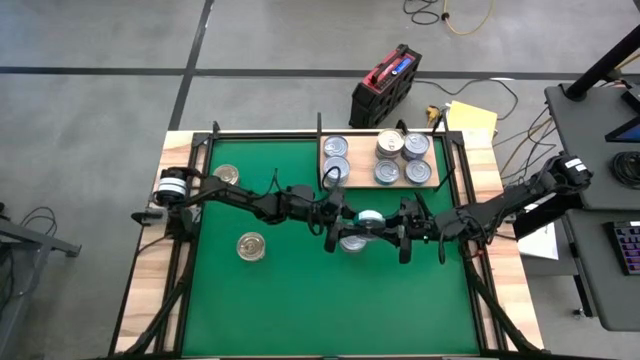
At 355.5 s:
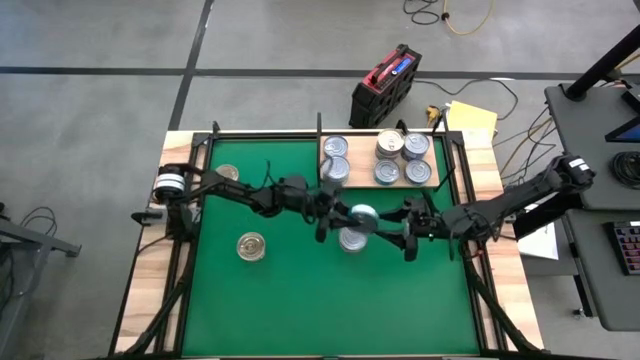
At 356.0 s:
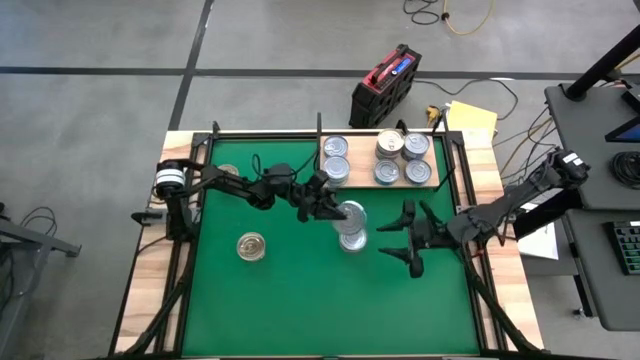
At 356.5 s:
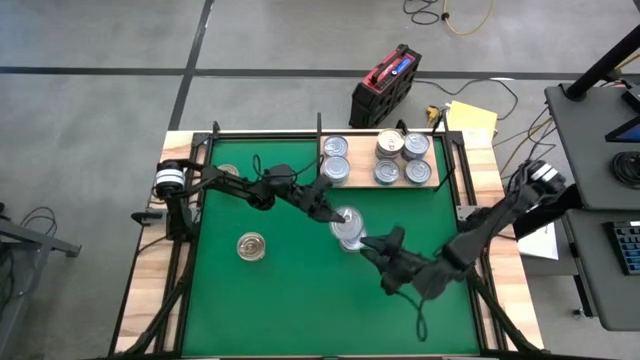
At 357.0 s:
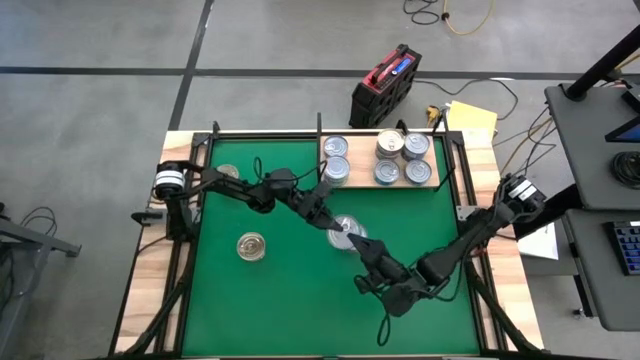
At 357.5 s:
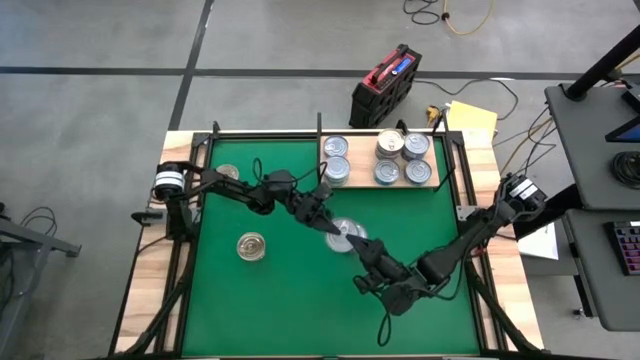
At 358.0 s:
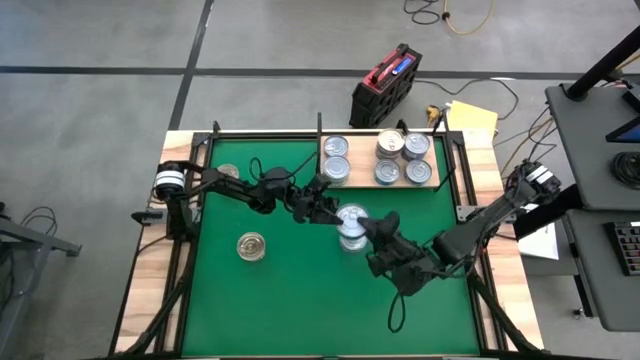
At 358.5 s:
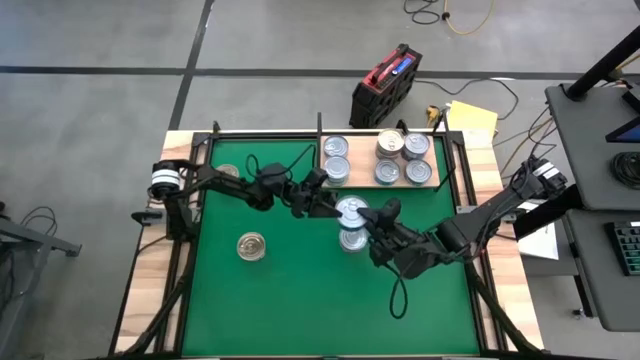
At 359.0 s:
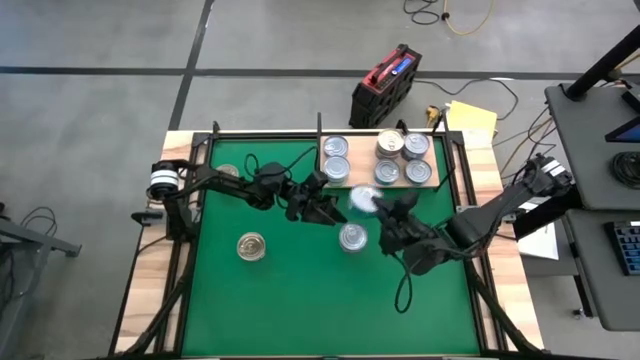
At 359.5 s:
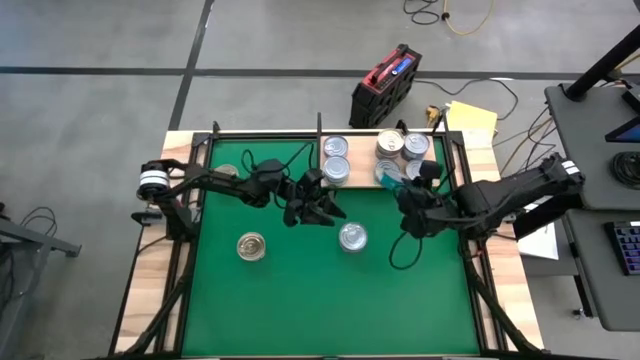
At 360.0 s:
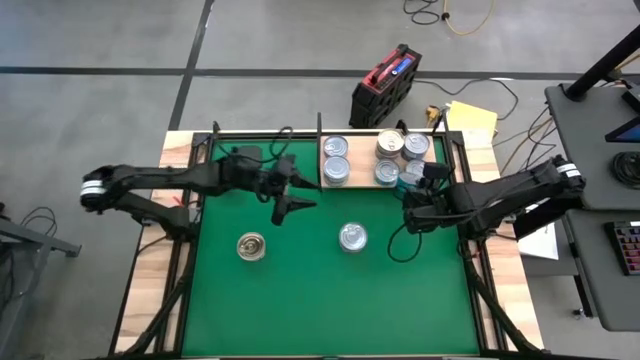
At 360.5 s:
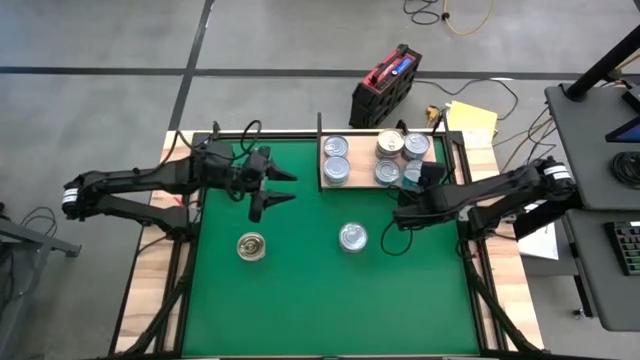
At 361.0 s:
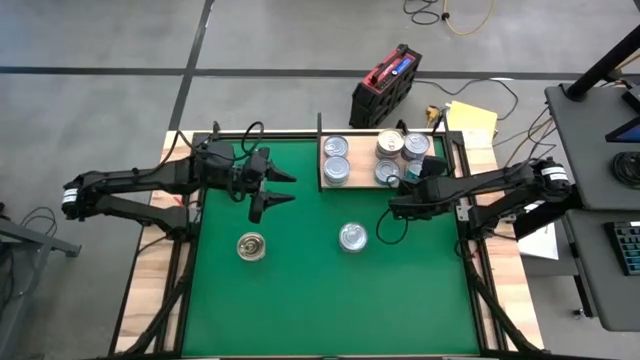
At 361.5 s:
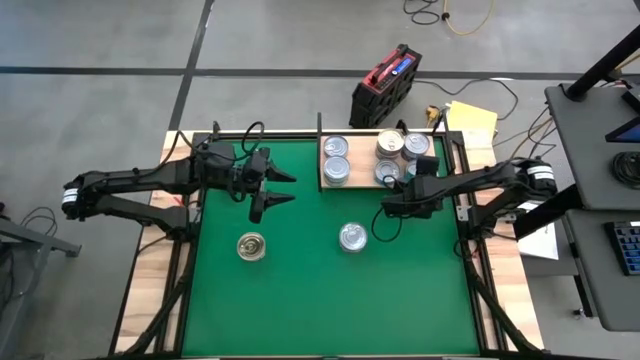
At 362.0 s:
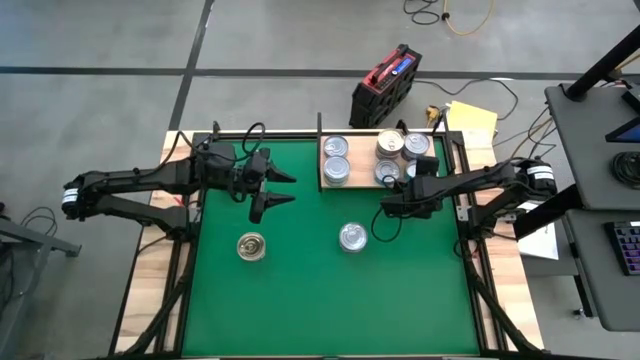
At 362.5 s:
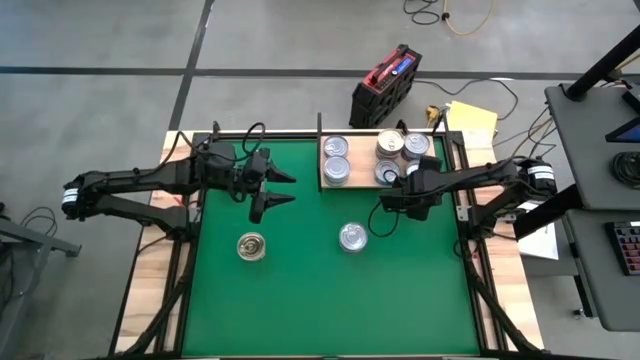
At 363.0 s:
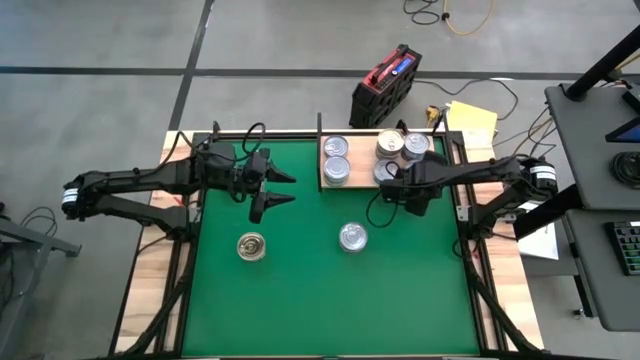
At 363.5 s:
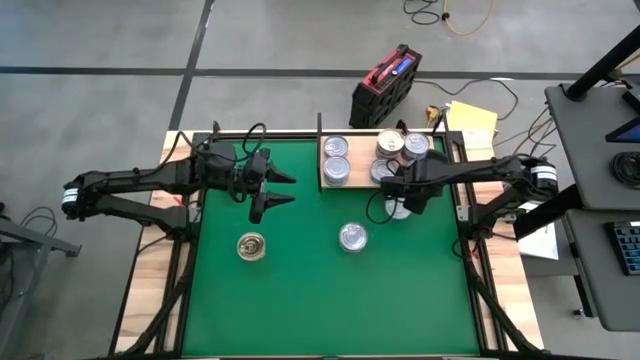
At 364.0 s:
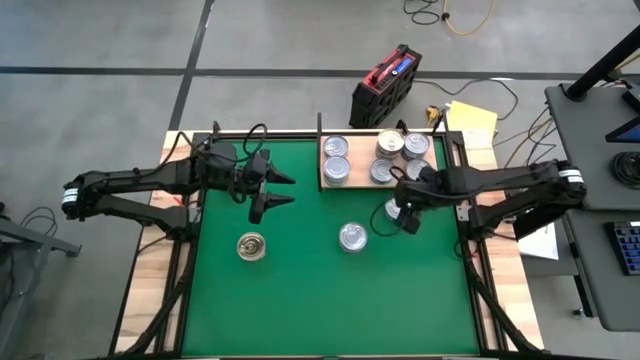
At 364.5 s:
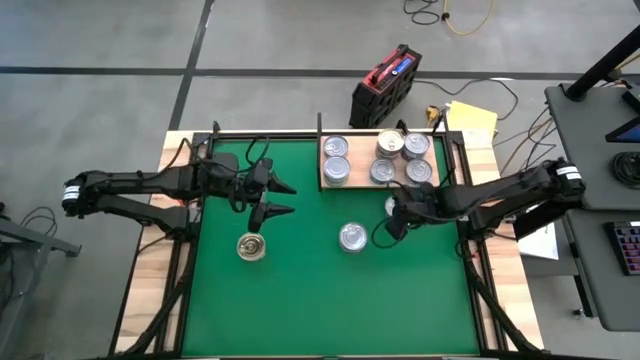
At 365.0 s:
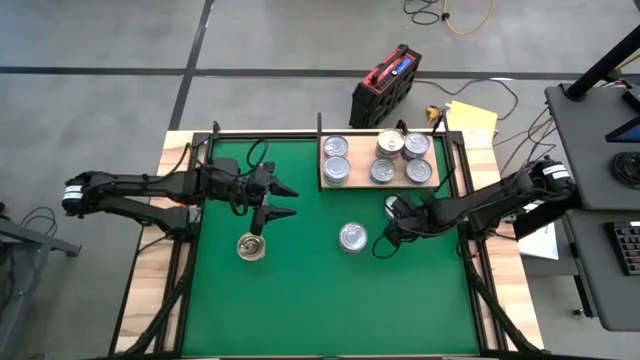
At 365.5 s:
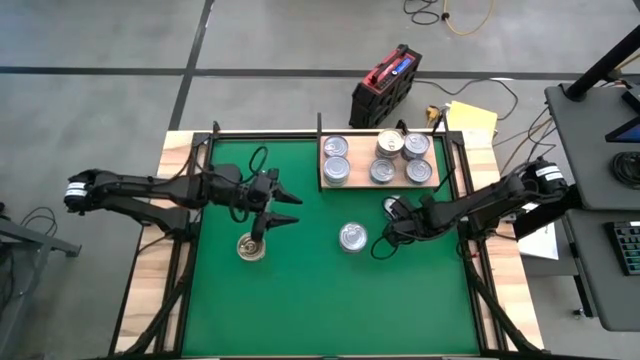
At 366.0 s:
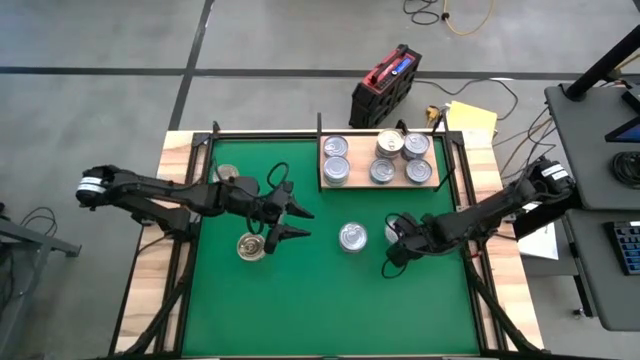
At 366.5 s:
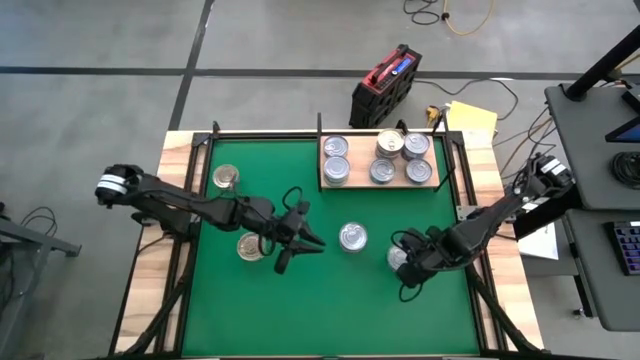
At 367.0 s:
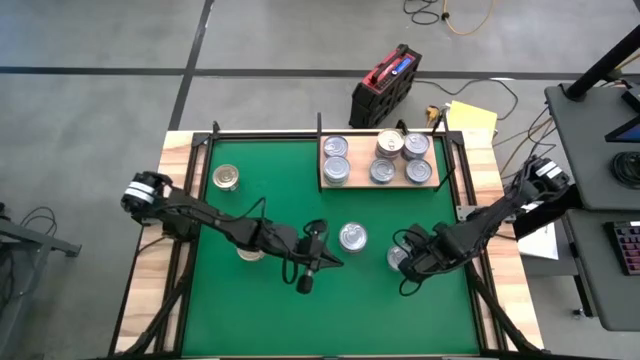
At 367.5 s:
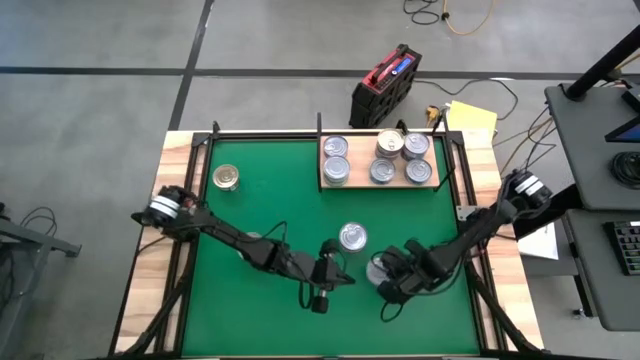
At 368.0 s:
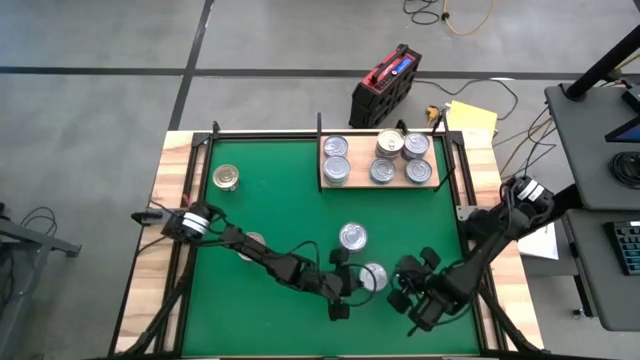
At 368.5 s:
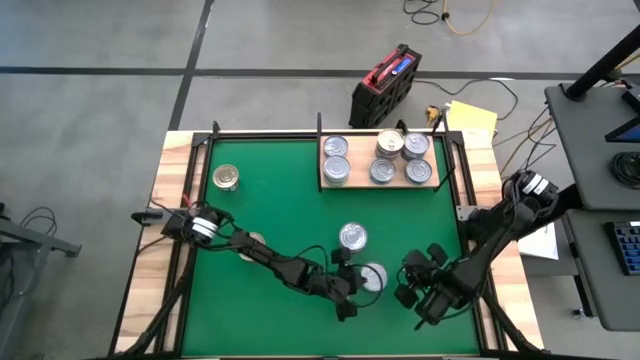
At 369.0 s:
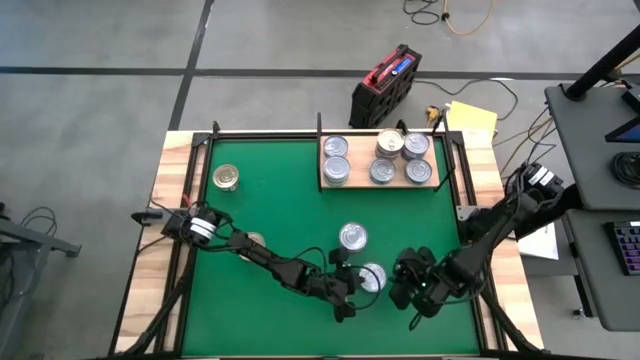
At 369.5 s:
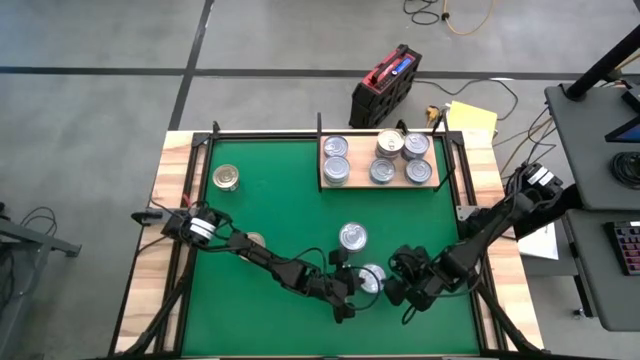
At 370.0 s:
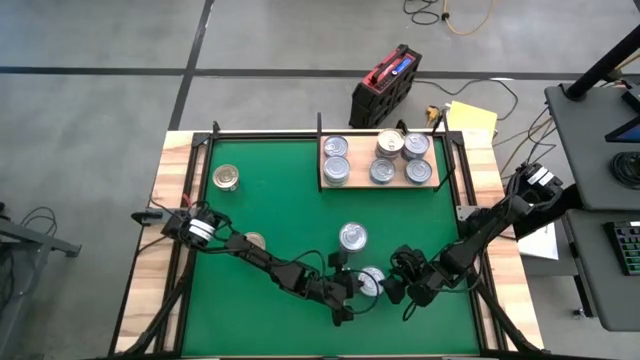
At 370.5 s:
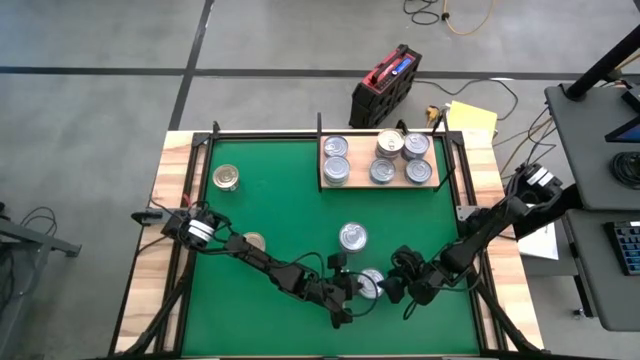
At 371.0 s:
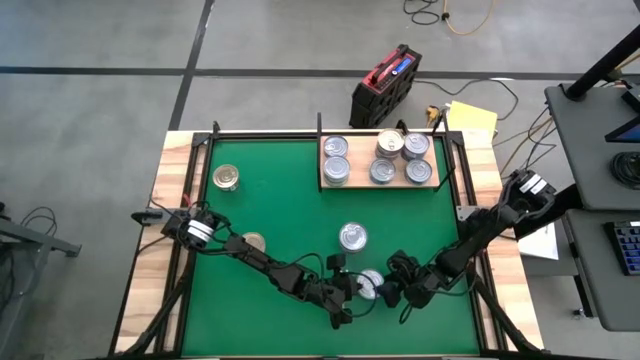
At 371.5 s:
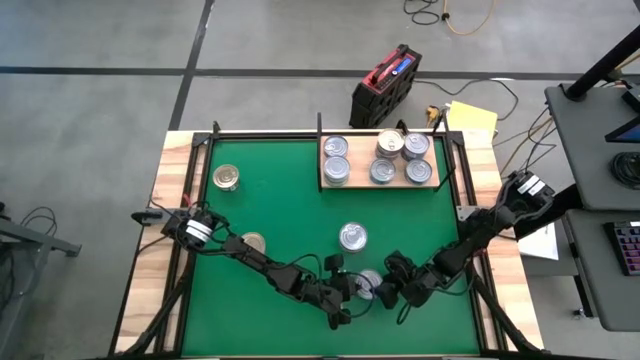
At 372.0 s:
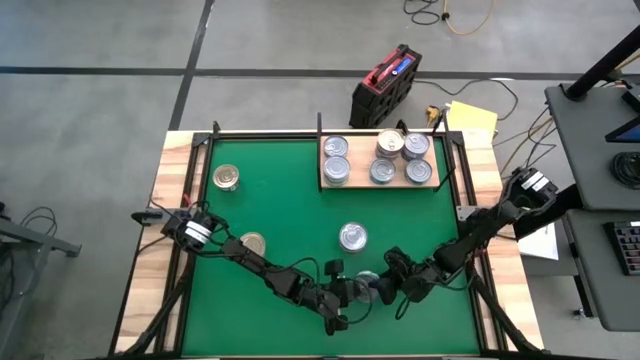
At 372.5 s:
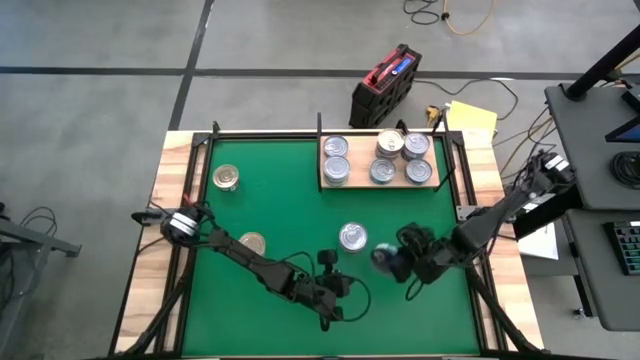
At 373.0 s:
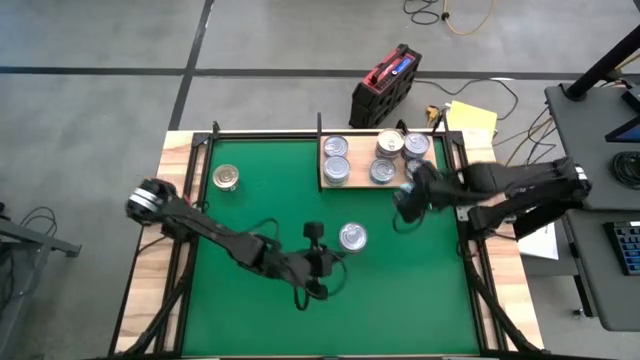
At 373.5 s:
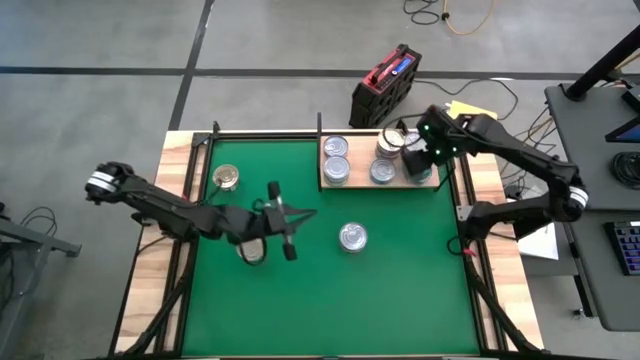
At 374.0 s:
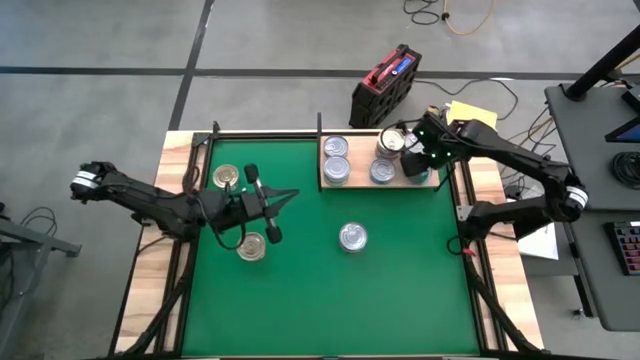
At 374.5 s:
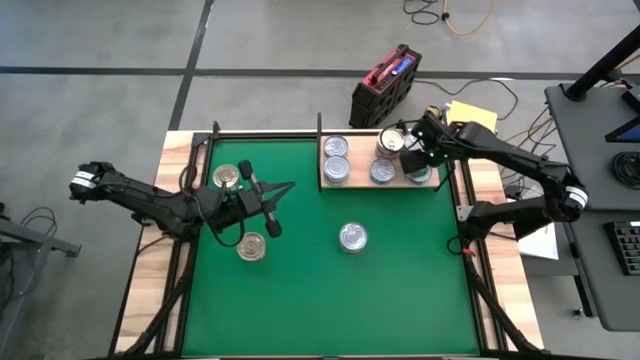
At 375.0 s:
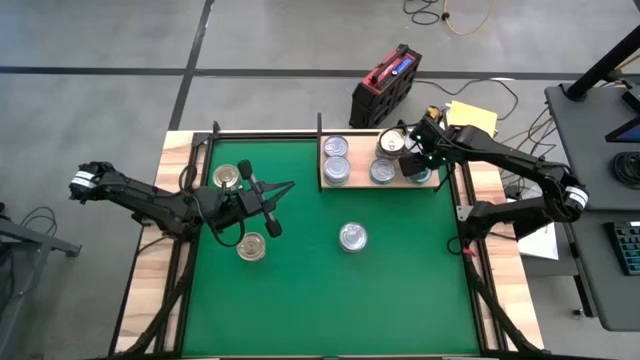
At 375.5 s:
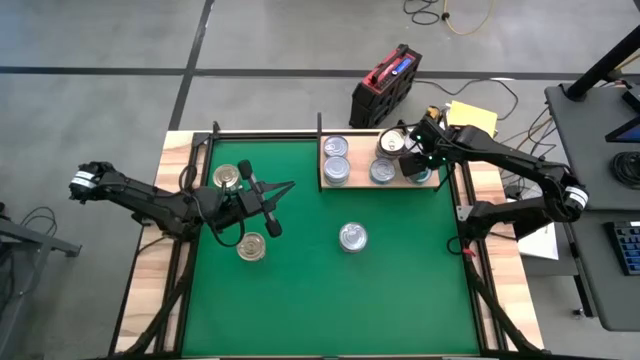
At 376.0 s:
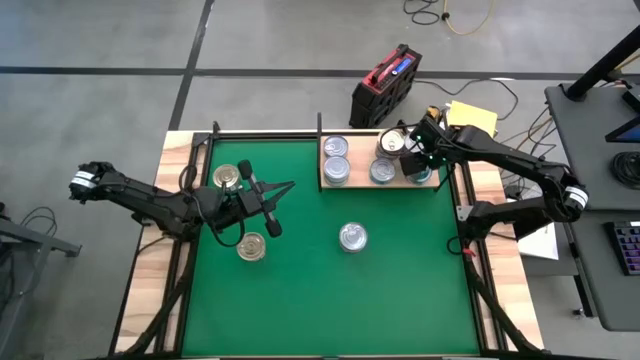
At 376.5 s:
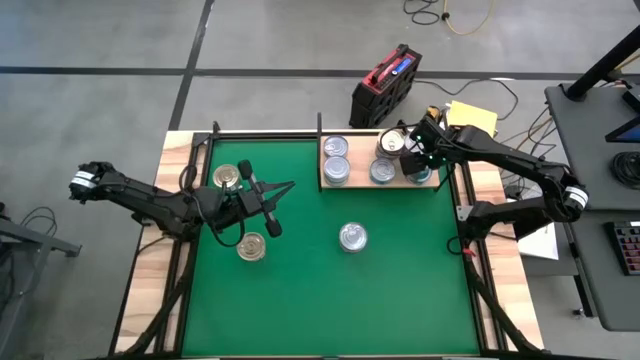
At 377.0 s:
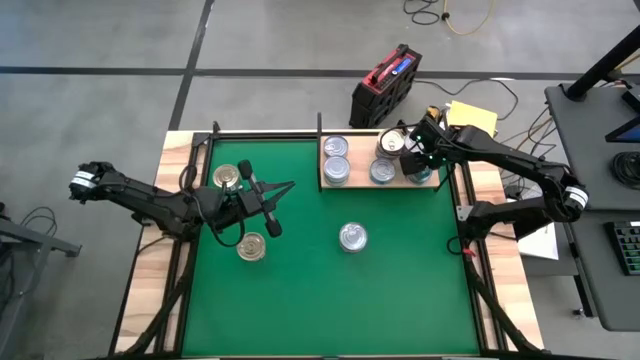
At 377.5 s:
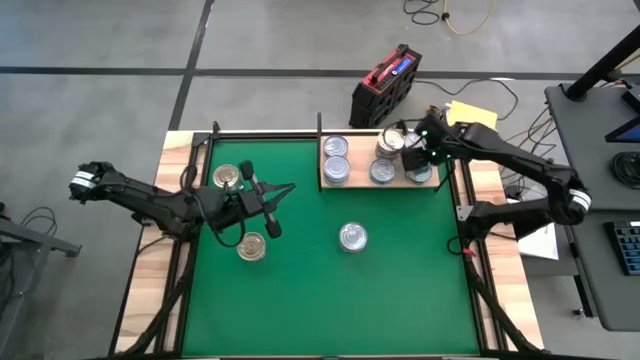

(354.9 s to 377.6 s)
Task: Stack canned seafood by type on shelf
Stack the green/blue tuna can on top of the green/blue tuna can on the shelf
